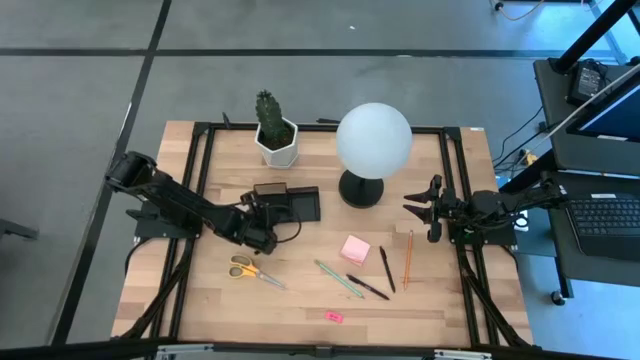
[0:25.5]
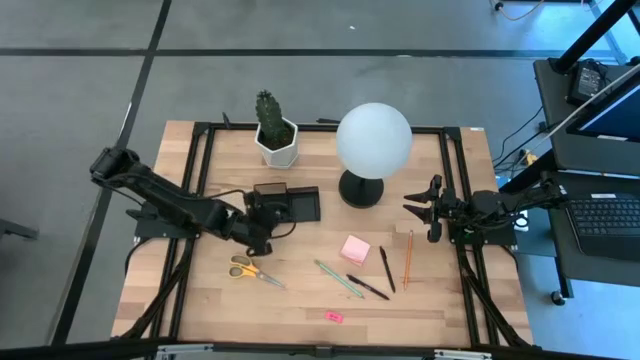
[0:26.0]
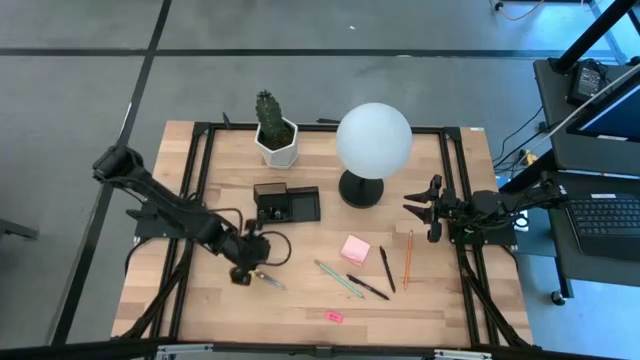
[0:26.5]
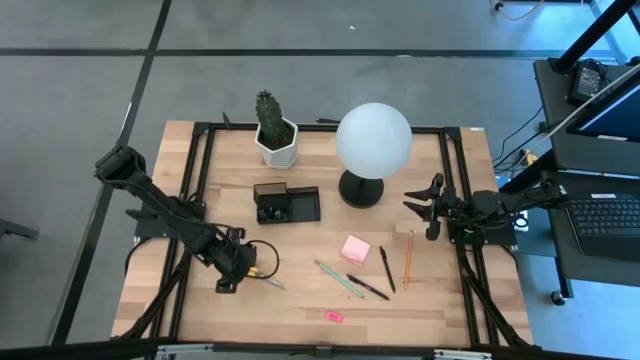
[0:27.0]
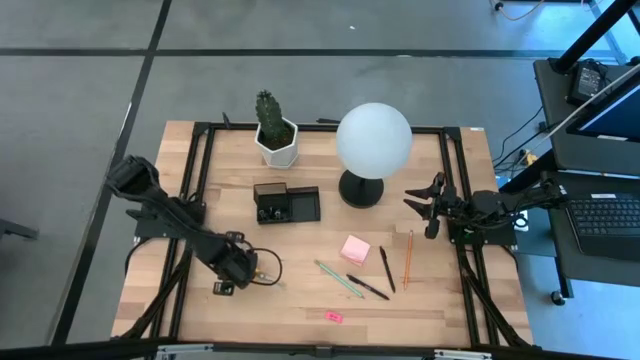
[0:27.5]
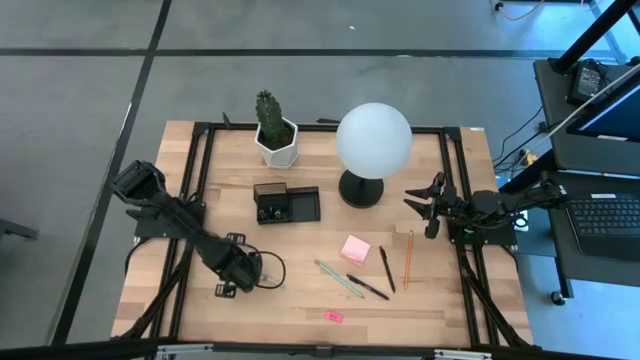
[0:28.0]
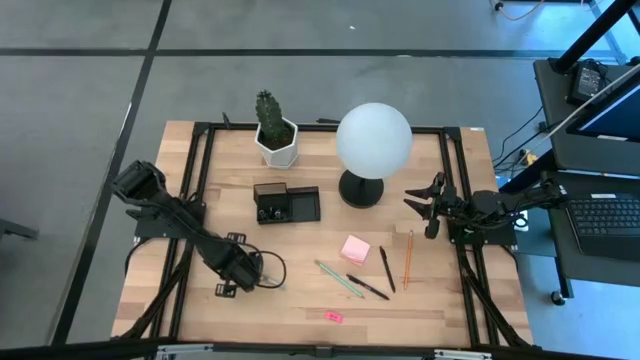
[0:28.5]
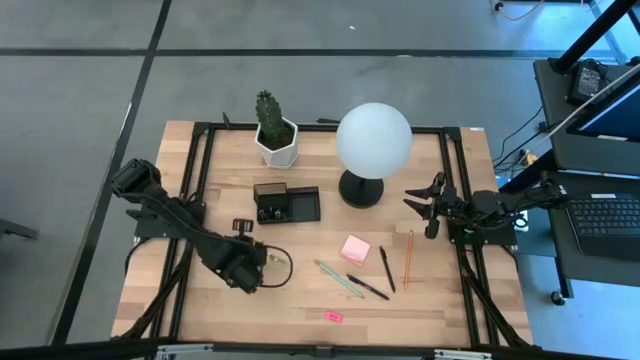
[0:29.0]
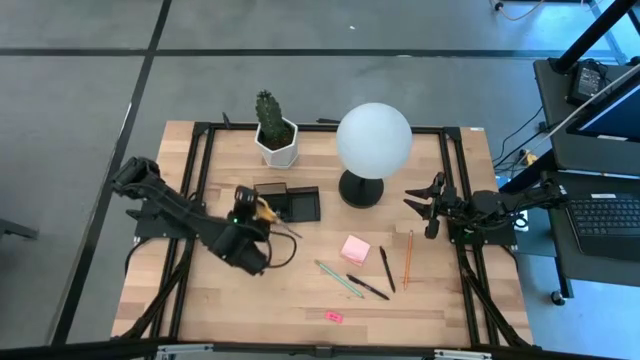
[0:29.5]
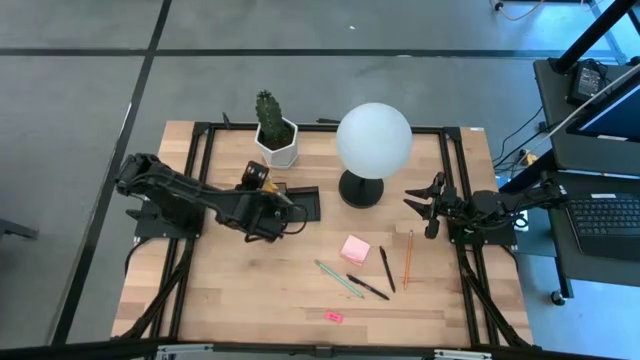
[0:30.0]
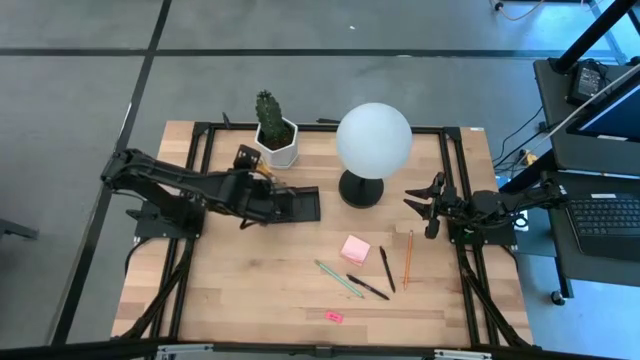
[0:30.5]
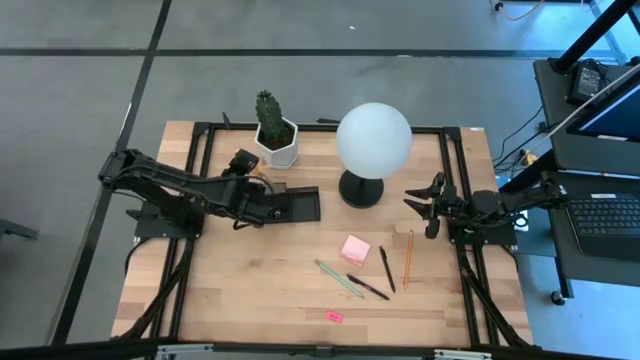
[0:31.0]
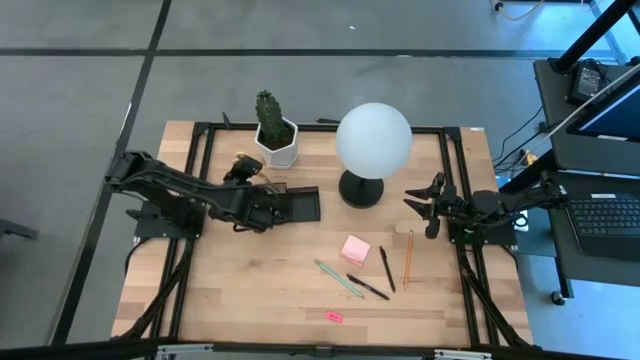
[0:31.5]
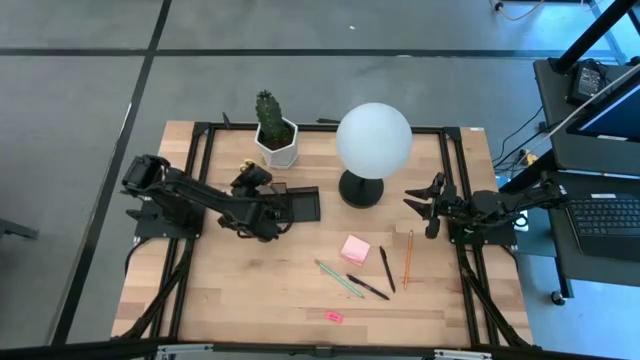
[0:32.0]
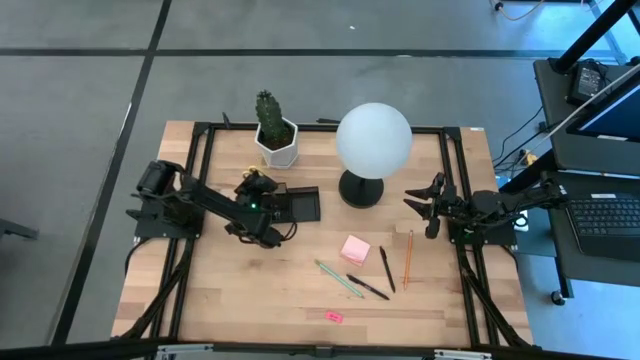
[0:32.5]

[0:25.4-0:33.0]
Task: Pick and place office supplies into organizer
Put the yellow scissor into the black desk organizer

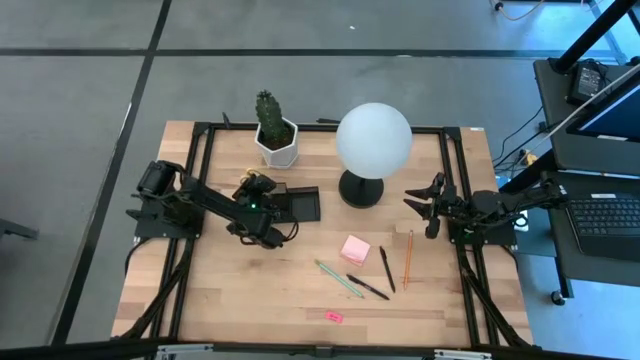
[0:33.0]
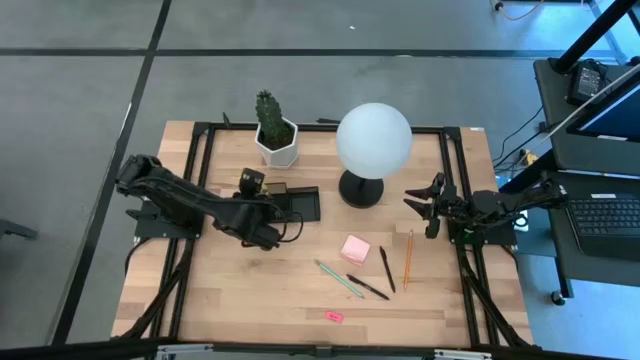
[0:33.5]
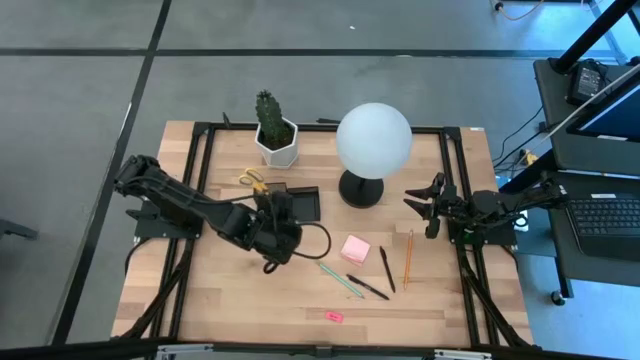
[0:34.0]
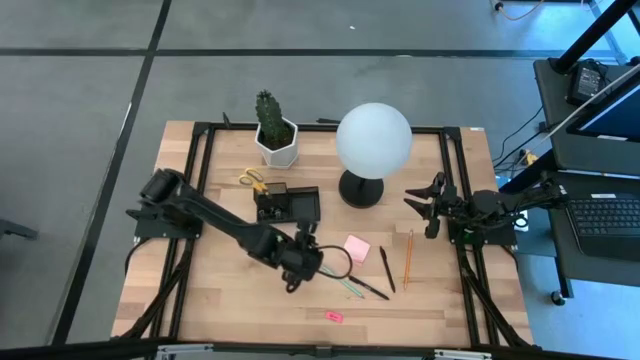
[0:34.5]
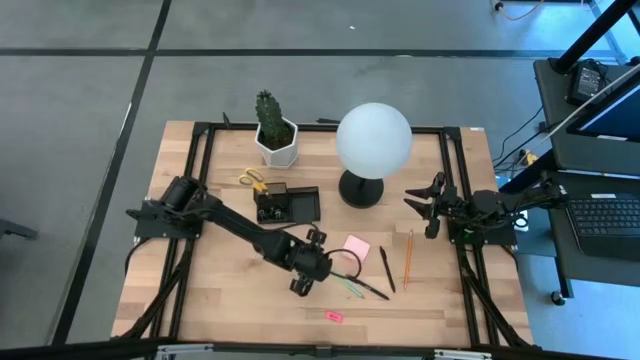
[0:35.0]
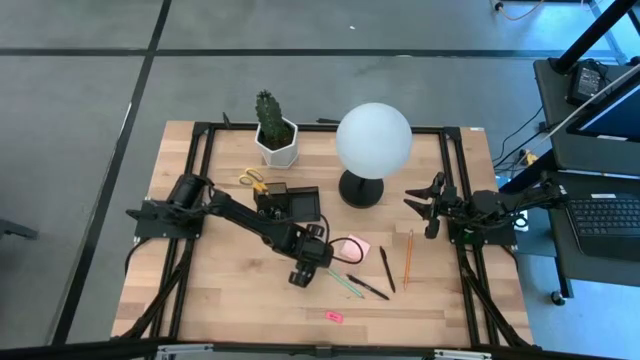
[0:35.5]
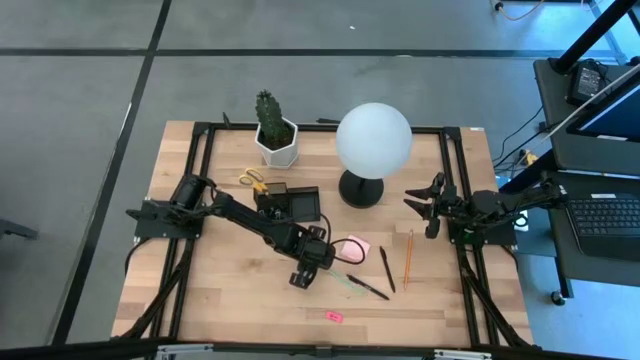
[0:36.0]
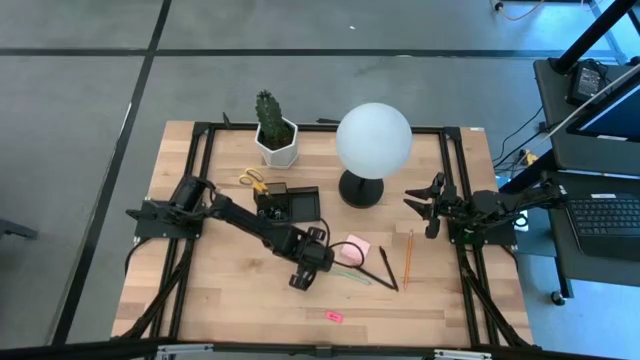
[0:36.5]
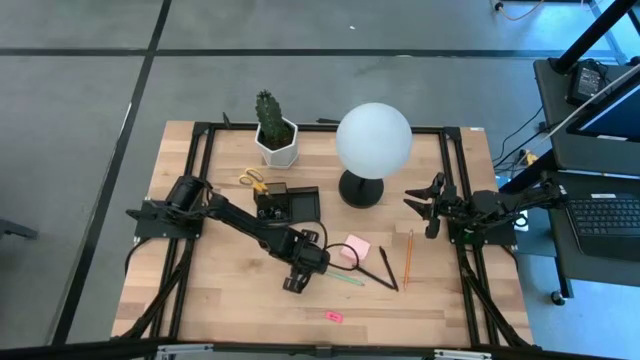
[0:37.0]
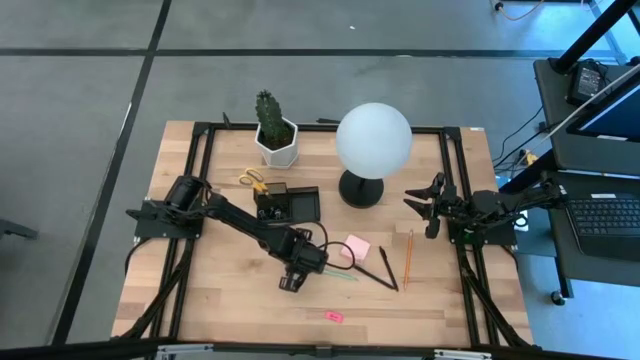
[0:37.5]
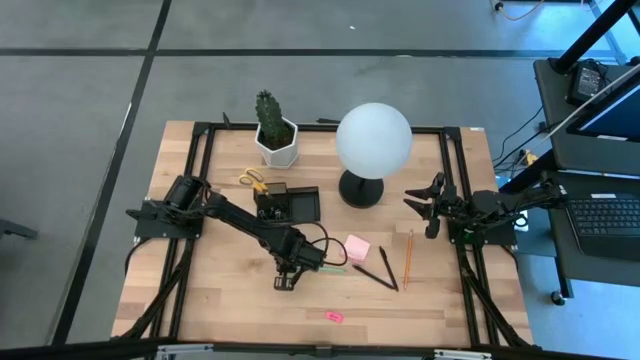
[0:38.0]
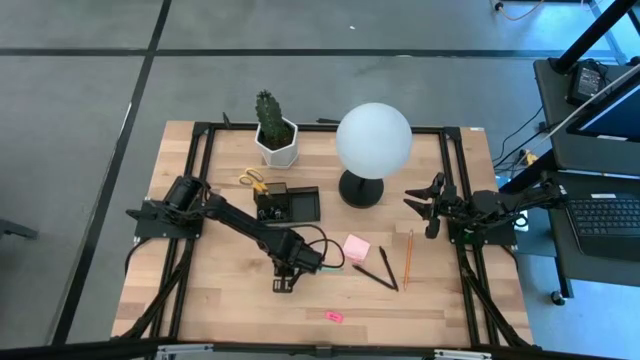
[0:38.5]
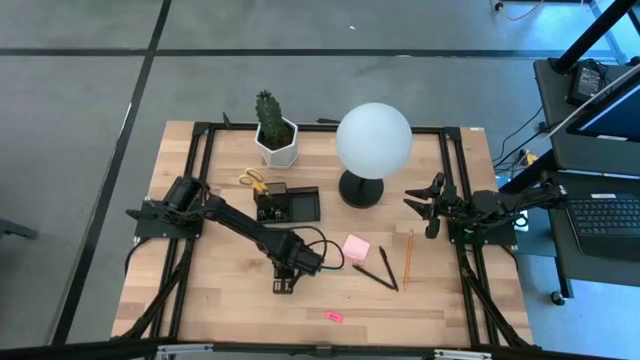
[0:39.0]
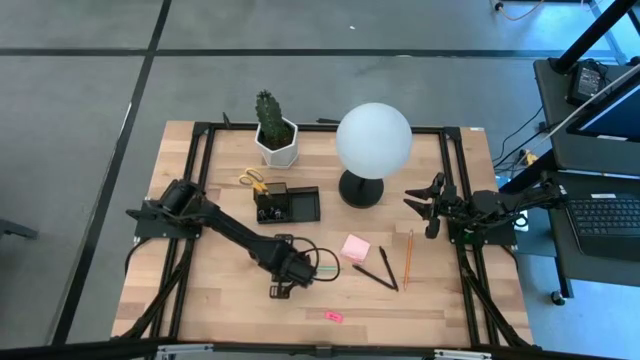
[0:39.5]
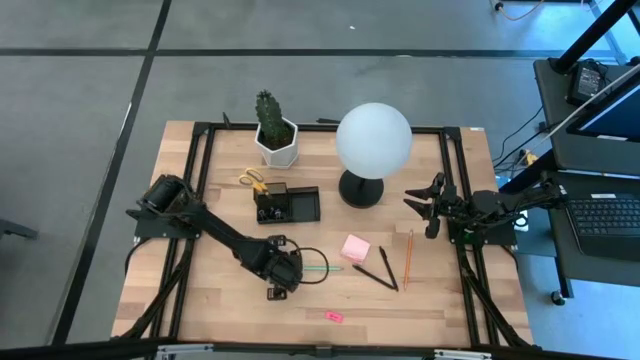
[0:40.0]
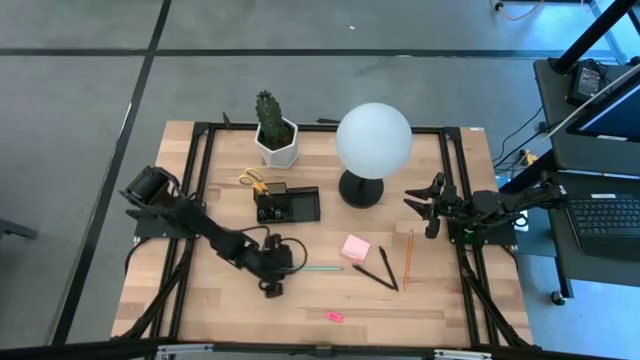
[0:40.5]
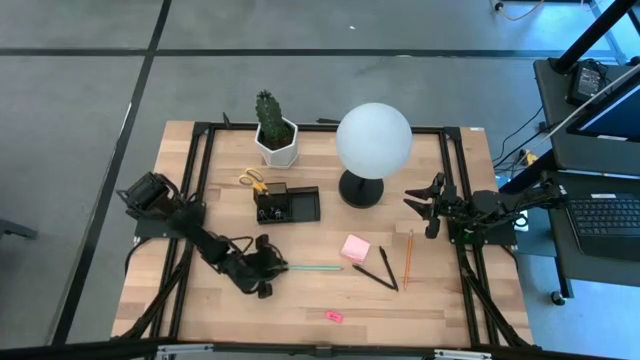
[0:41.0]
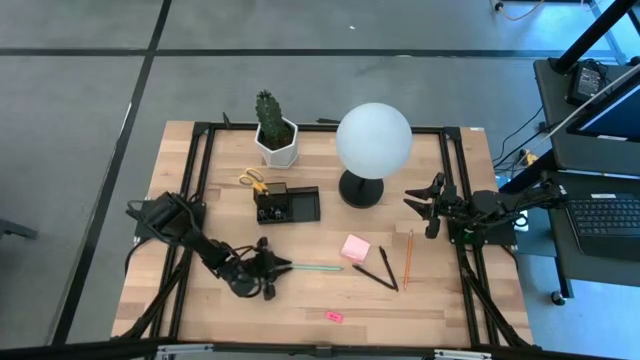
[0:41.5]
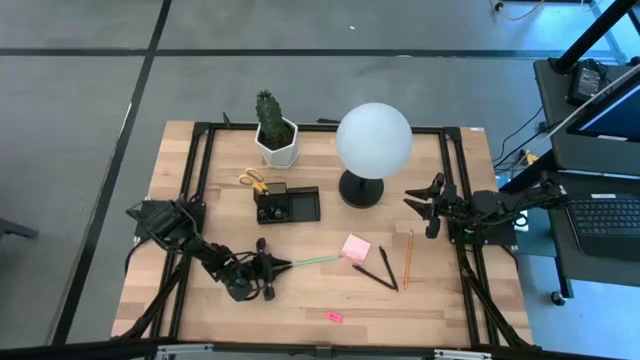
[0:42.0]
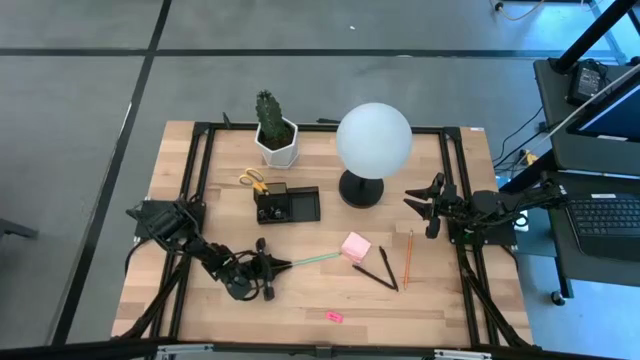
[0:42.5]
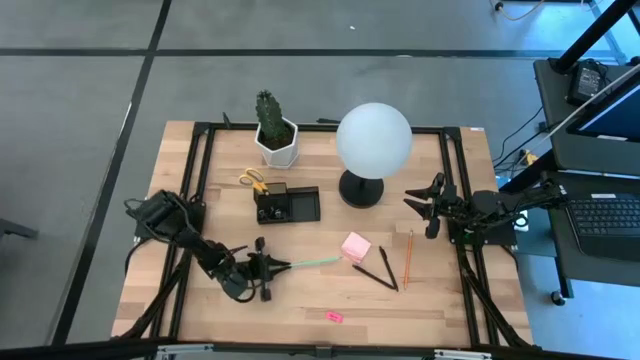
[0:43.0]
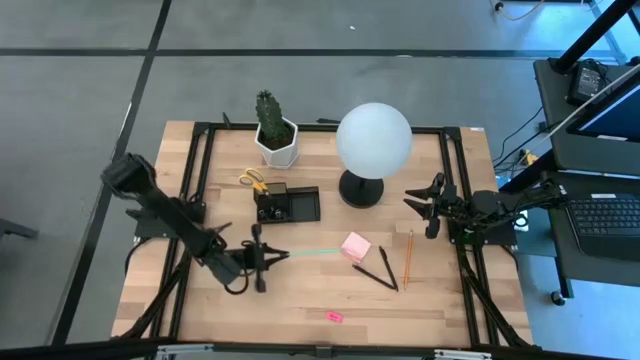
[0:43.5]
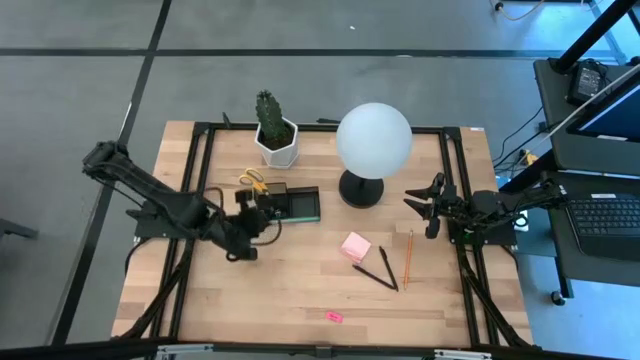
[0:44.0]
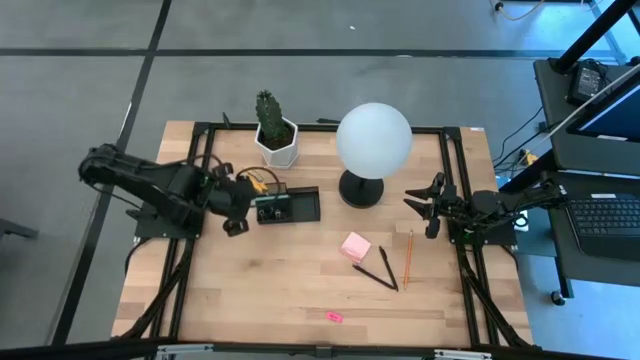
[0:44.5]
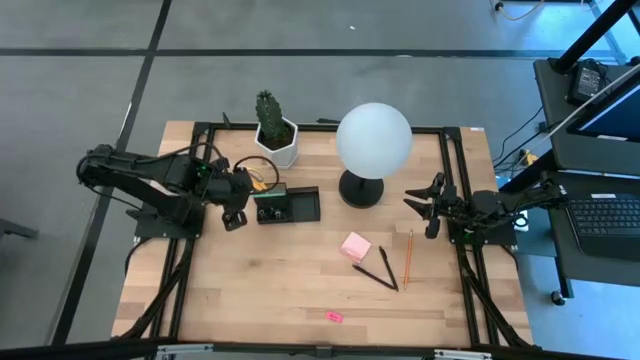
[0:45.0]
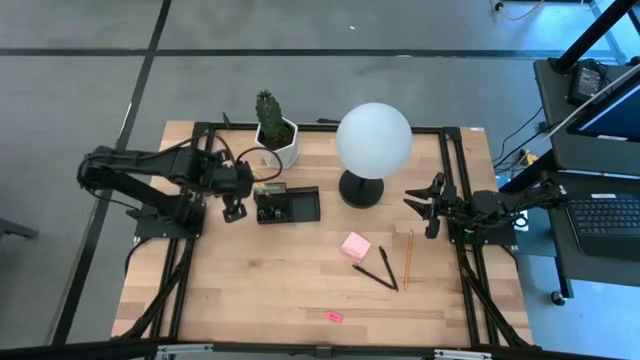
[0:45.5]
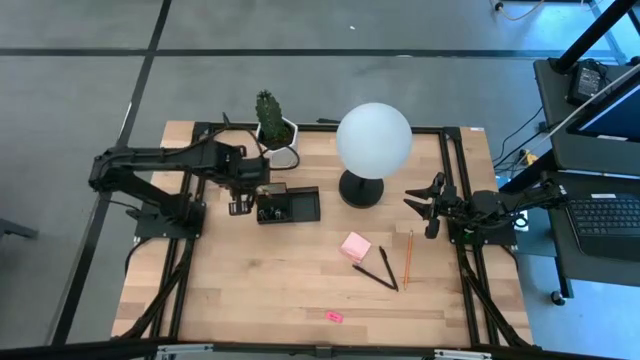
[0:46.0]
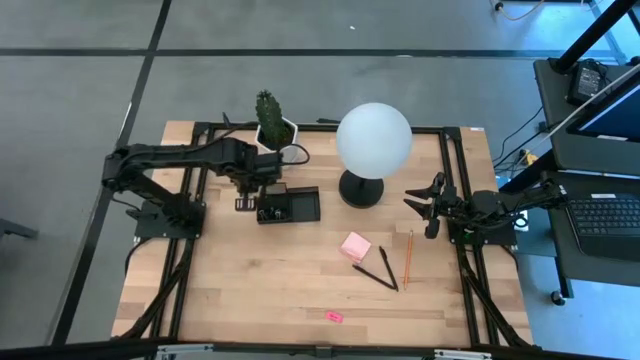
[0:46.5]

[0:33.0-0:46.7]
Put the light blue pencil into the black desk organizer
